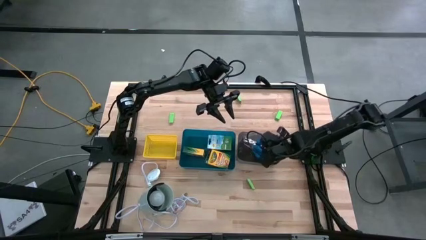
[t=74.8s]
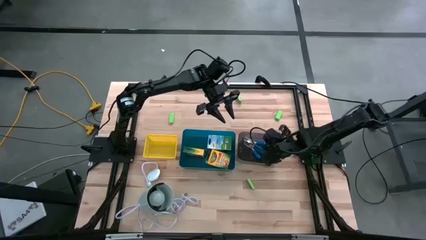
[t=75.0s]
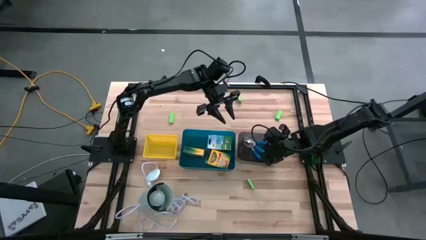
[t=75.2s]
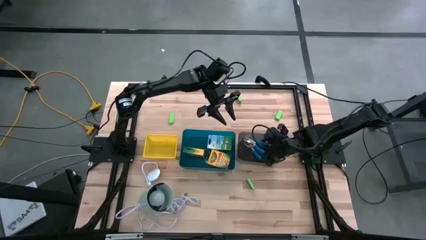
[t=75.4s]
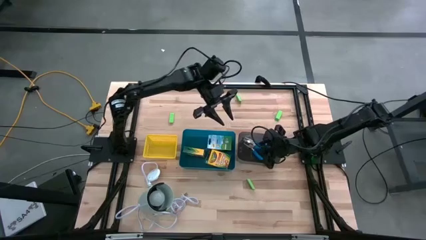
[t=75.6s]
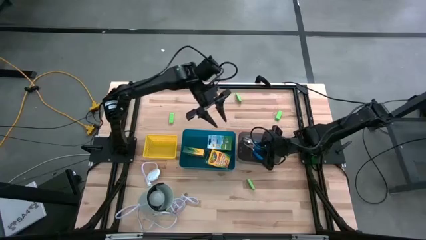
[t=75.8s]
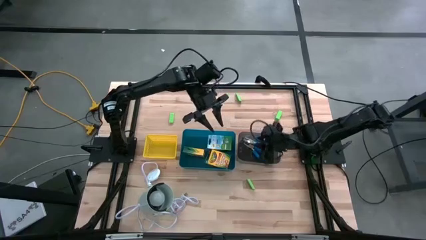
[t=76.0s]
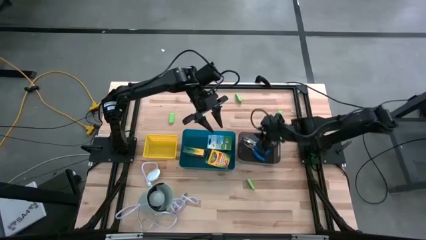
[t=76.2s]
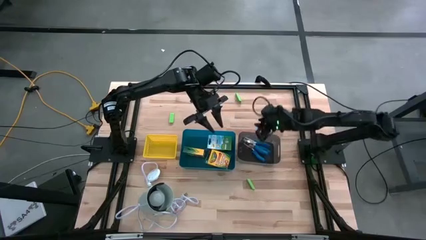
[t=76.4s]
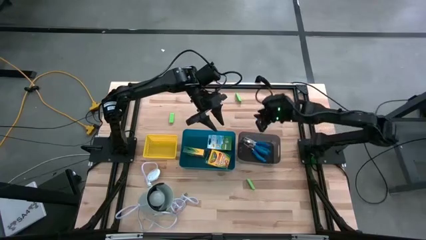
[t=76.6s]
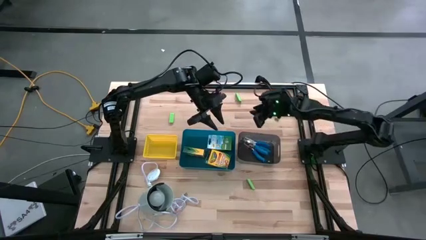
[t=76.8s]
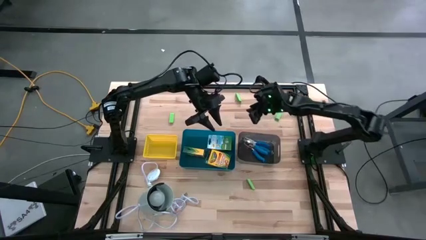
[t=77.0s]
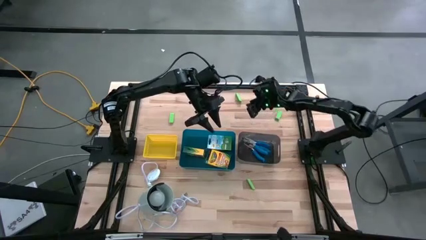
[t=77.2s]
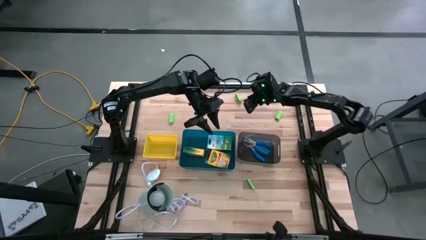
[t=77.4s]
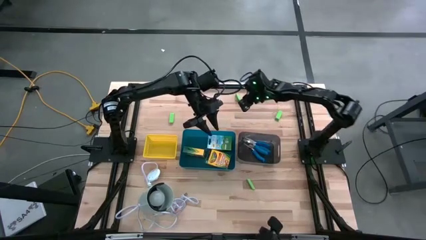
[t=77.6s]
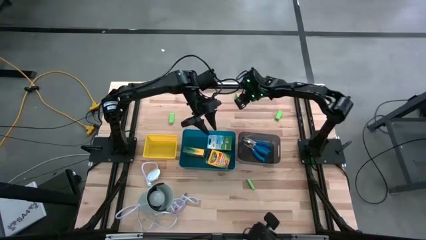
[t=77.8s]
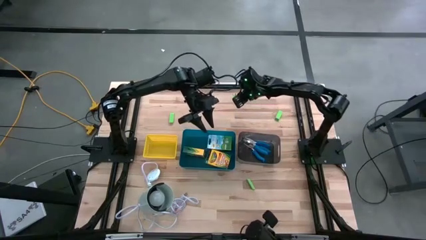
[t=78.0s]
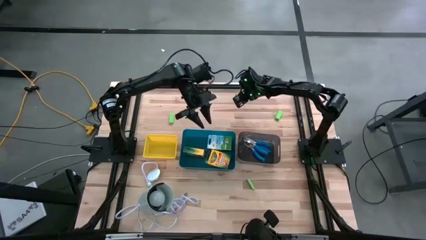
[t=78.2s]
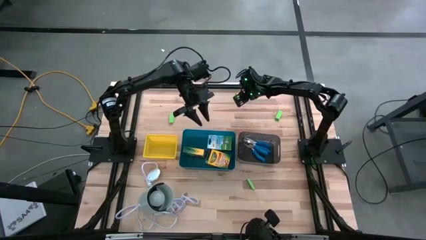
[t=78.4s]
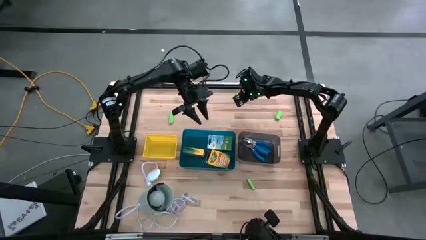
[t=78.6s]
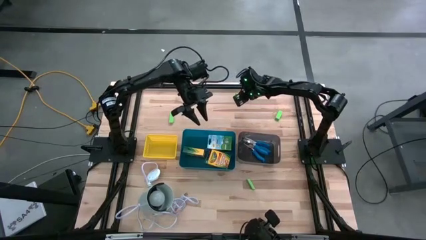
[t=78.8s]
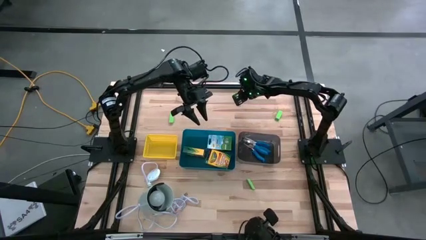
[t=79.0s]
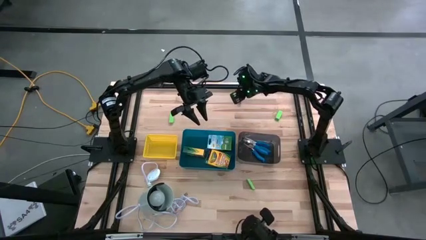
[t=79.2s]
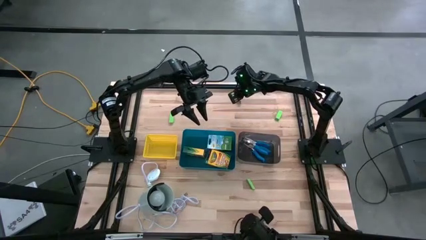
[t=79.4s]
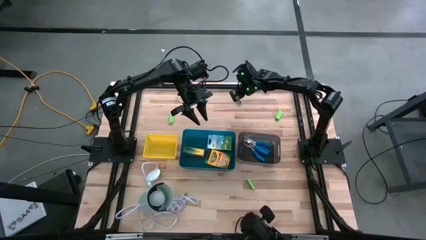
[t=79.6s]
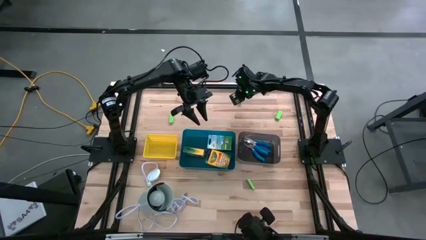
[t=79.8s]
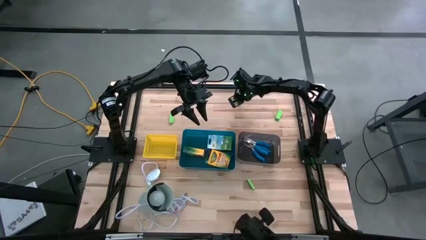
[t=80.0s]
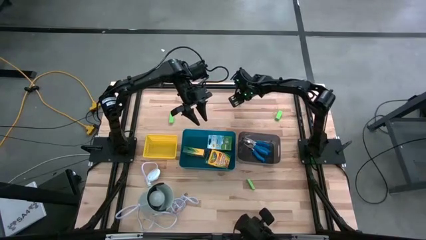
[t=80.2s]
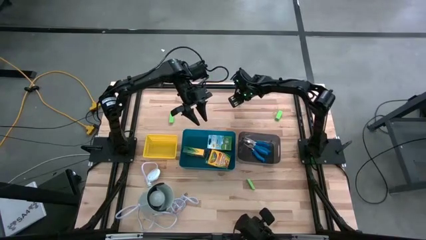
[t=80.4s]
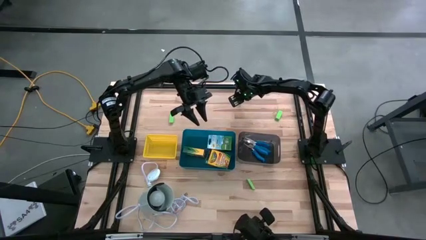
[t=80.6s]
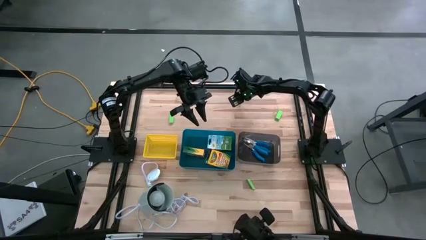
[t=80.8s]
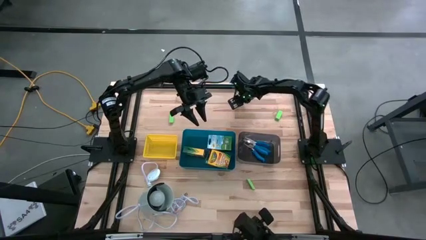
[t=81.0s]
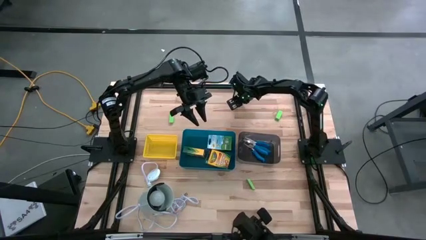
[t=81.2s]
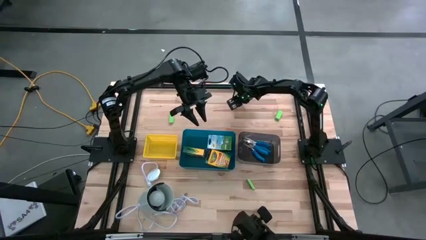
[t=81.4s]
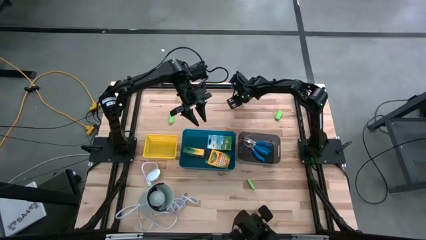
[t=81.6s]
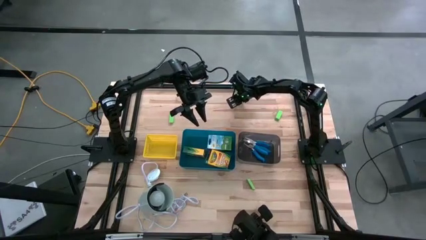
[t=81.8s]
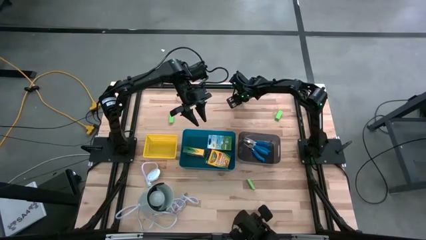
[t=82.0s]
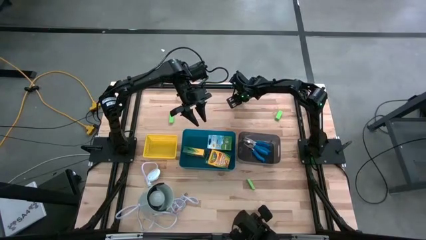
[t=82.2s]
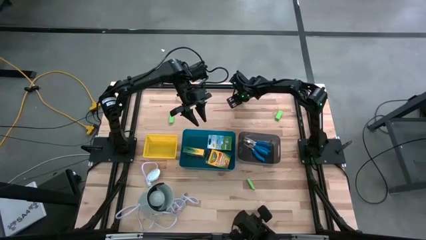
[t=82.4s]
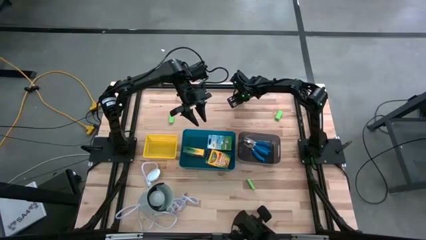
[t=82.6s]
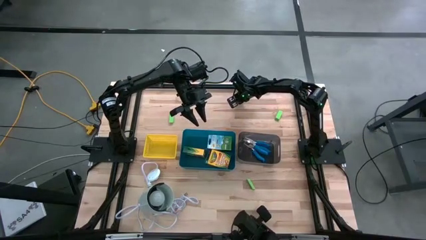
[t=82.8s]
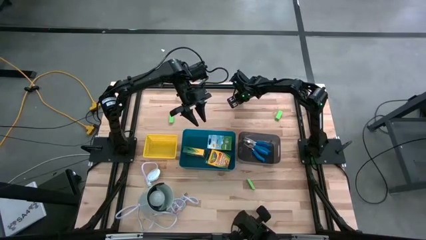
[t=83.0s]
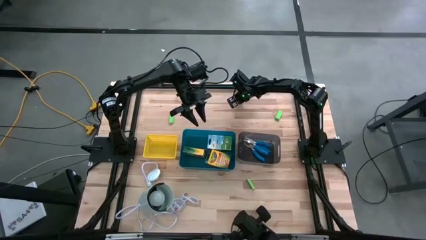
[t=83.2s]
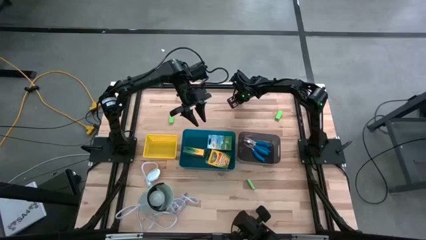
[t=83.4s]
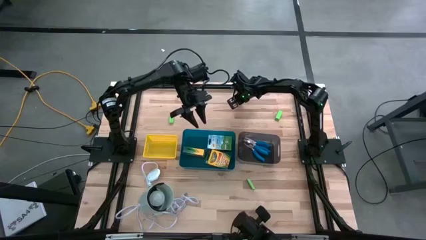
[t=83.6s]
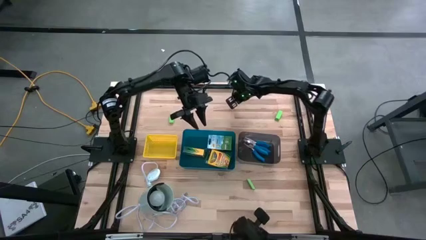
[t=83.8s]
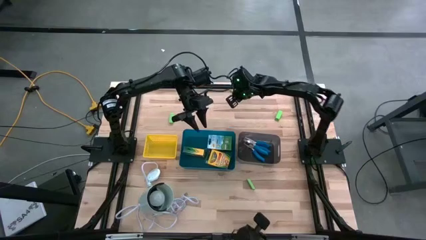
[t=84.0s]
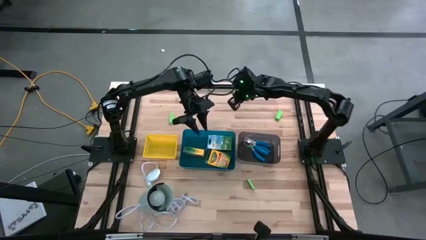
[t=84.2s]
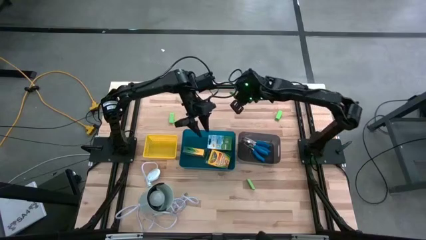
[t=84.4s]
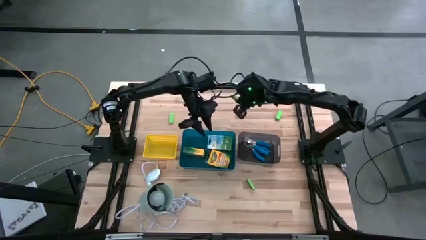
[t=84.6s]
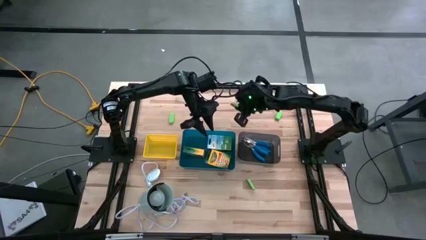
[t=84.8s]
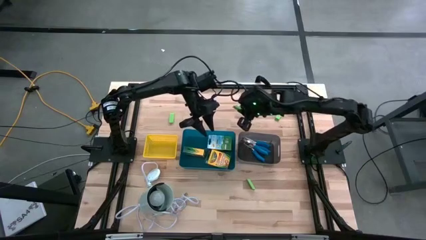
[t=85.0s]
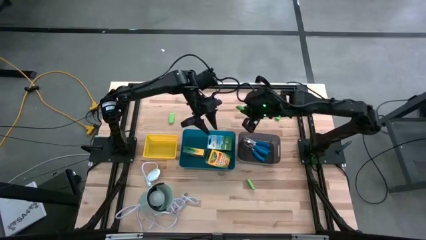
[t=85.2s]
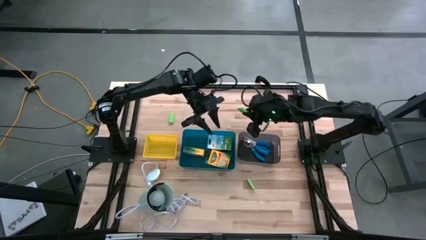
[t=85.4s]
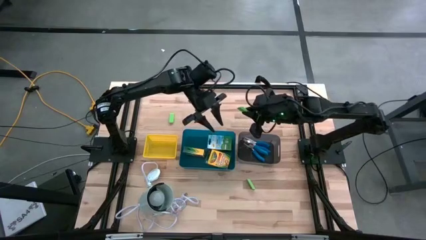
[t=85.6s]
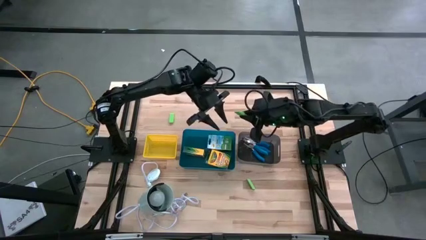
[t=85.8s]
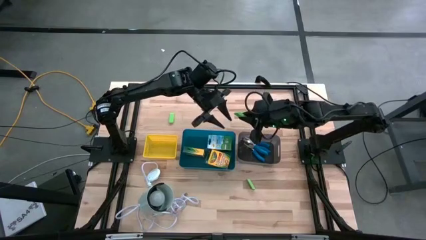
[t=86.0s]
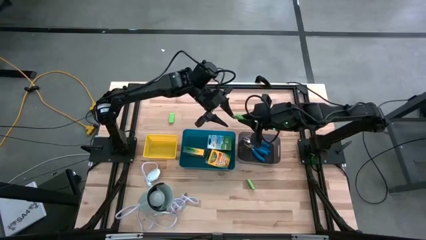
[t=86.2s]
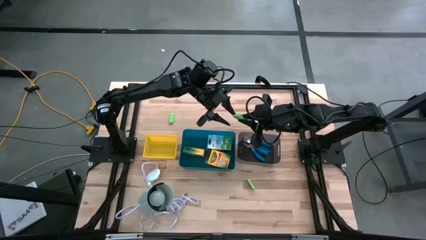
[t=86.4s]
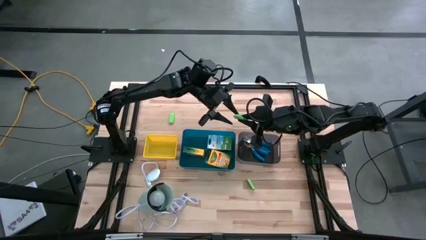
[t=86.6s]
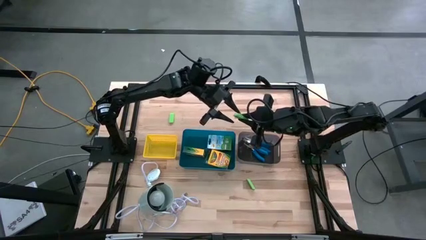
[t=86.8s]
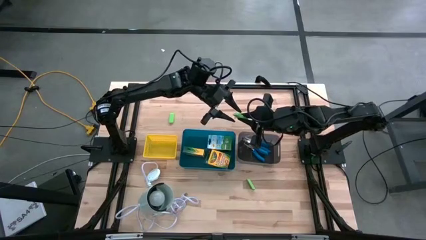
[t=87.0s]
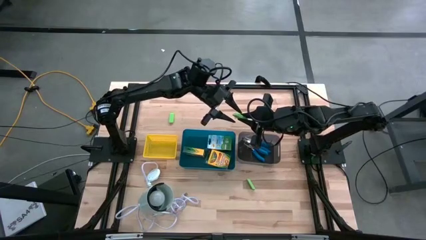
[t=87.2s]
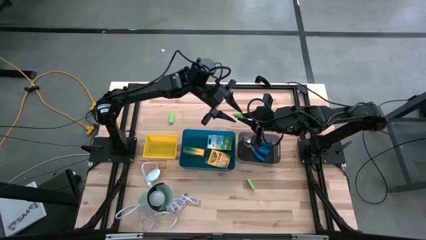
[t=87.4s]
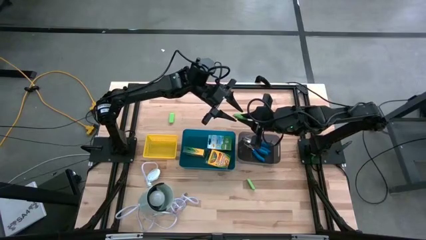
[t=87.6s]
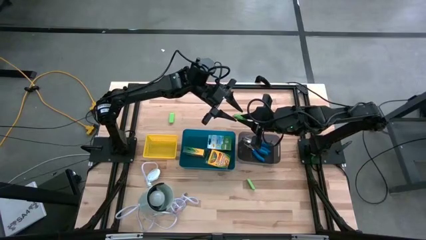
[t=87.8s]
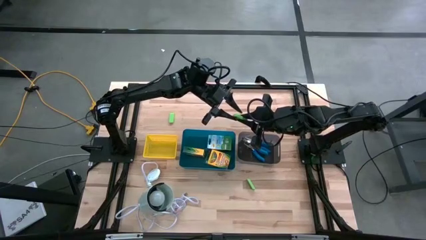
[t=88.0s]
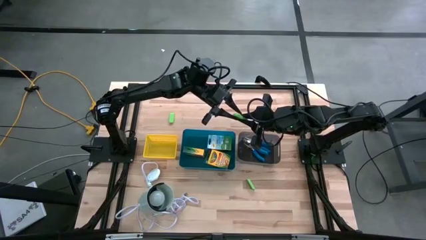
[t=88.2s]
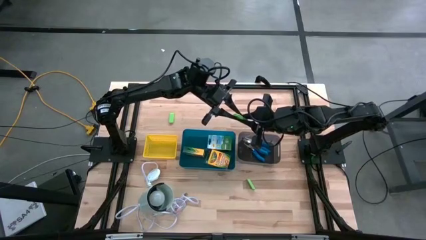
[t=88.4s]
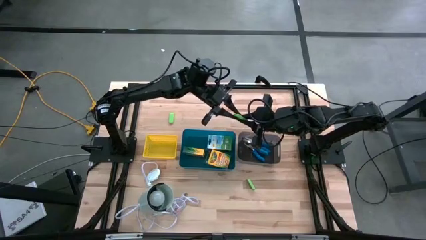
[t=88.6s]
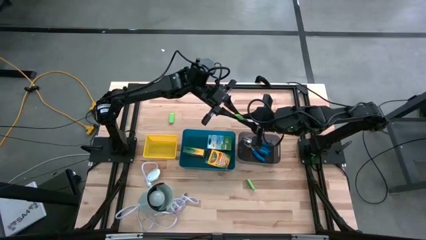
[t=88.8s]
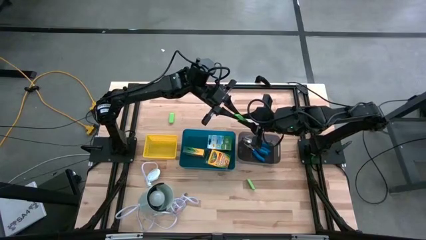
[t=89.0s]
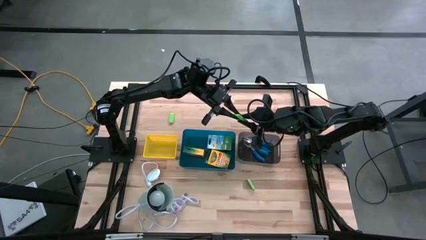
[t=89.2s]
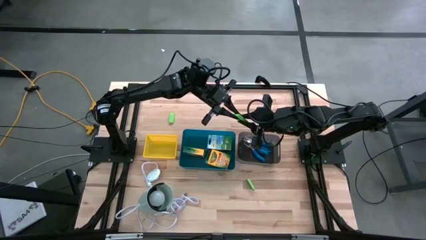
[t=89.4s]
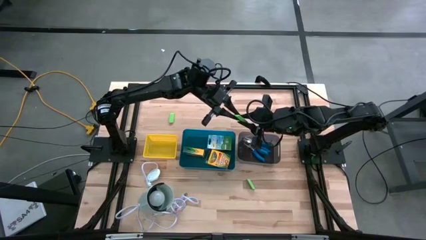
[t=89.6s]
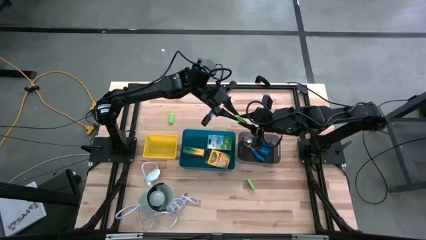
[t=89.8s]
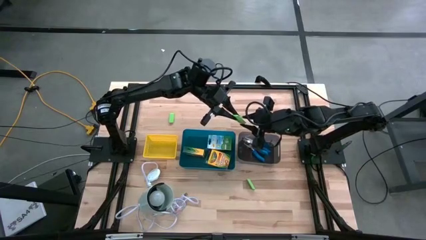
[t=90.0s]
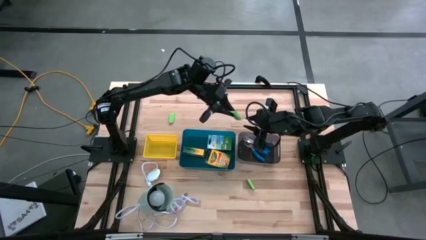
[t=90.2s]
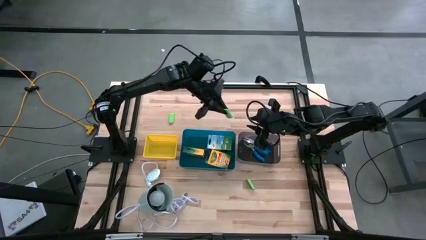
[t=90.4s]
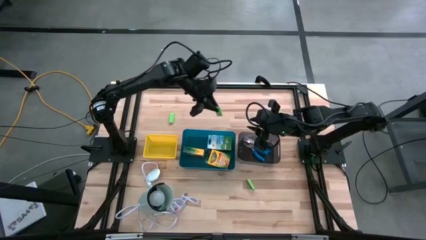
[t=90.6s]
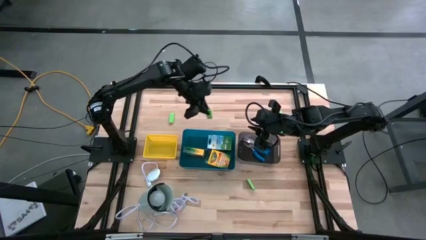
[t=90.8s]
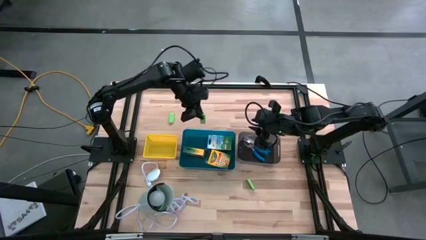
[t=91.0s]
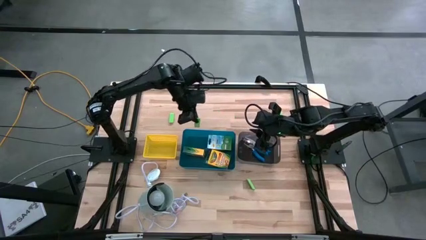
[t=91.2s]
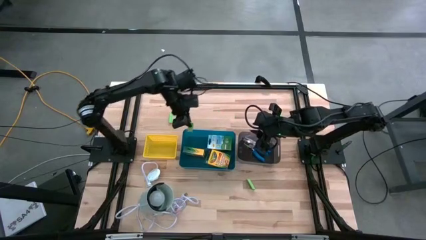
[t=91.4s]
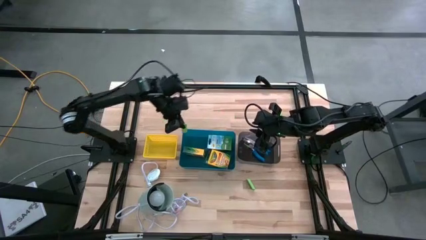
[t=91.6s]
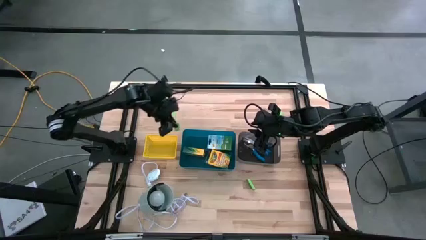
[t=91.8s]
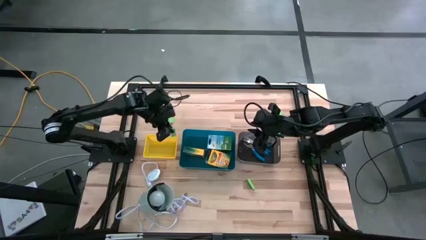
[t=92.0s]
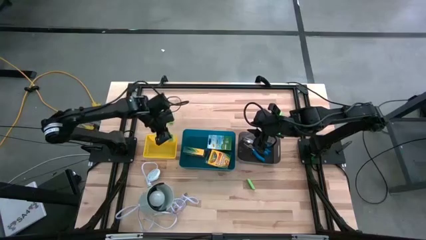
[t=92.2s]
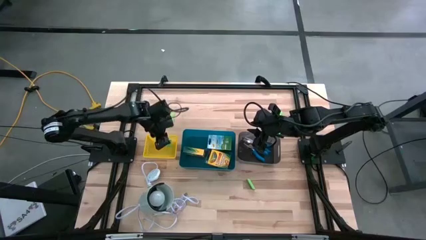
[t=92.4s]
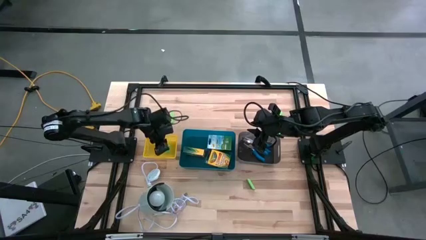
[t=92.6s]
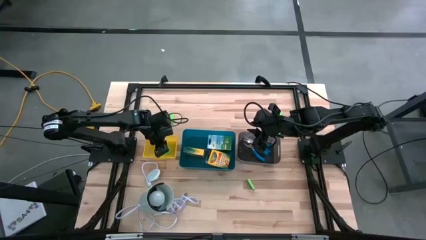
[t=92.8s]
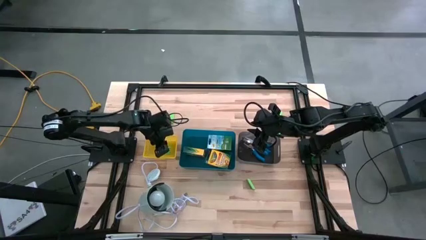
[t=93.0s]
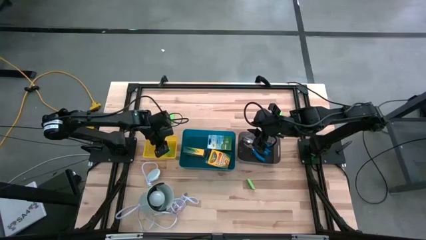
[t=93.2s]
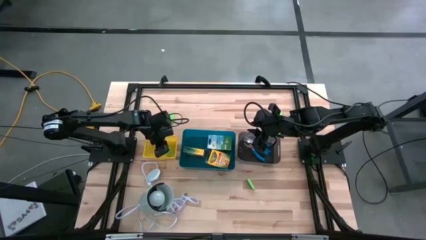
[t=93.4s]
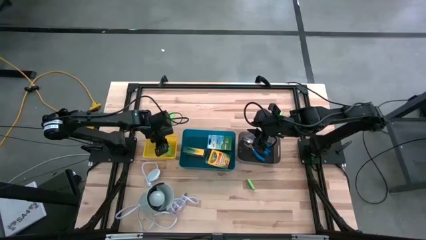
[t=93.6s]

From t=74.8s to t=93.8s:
Task: Pick & Place School Supplies
Put the green eraser into the yellow bin
